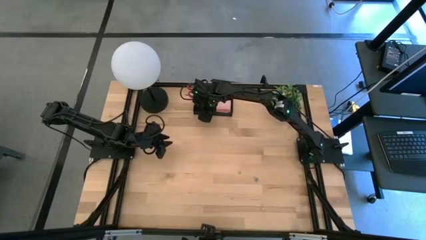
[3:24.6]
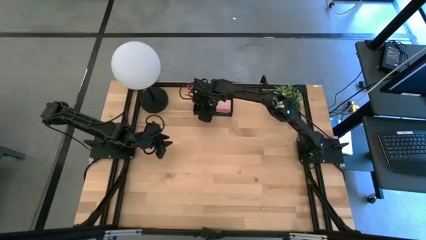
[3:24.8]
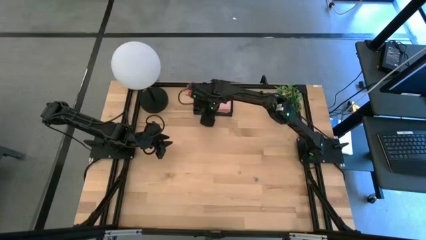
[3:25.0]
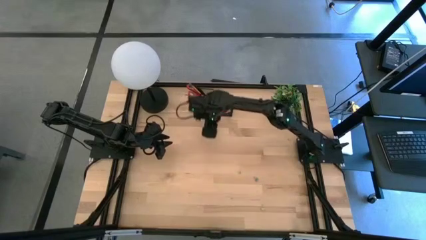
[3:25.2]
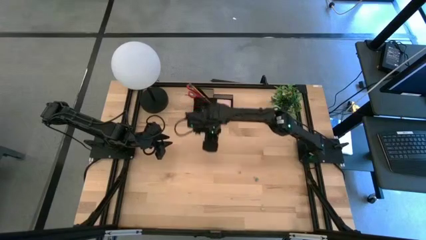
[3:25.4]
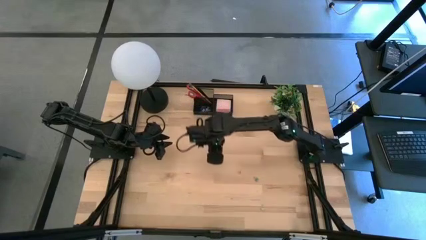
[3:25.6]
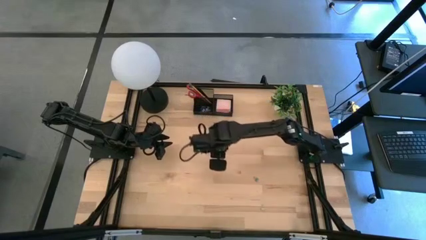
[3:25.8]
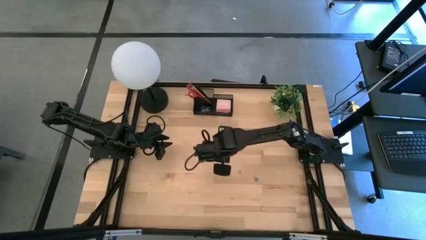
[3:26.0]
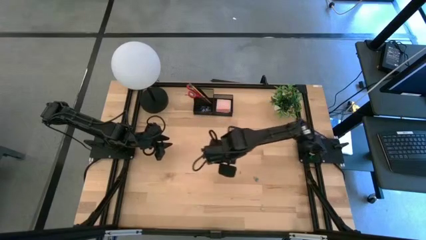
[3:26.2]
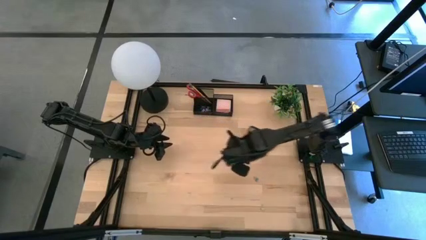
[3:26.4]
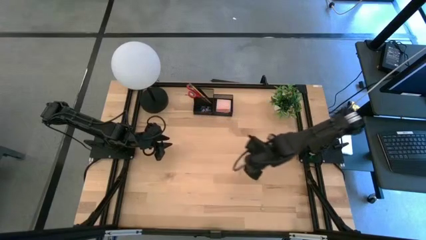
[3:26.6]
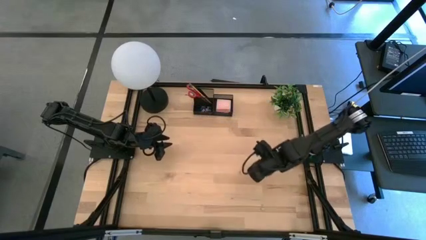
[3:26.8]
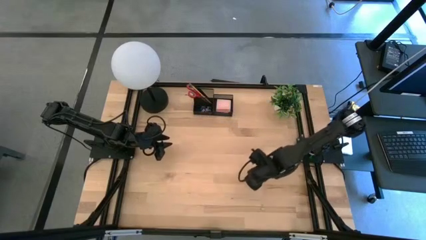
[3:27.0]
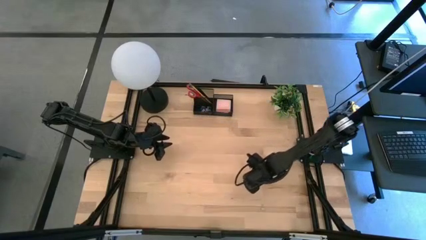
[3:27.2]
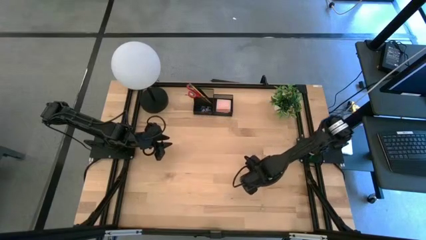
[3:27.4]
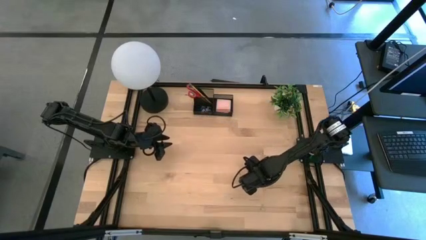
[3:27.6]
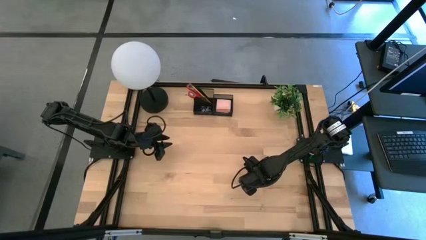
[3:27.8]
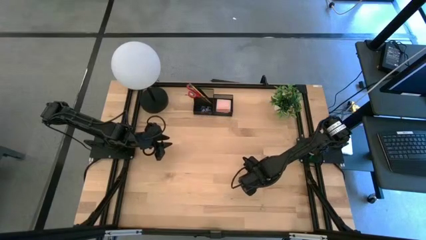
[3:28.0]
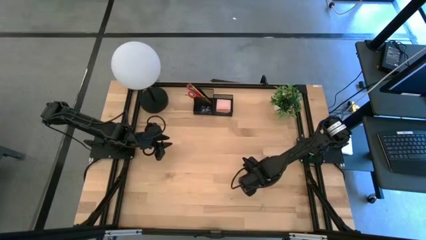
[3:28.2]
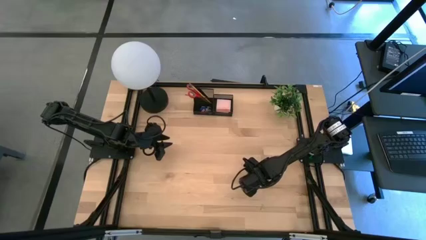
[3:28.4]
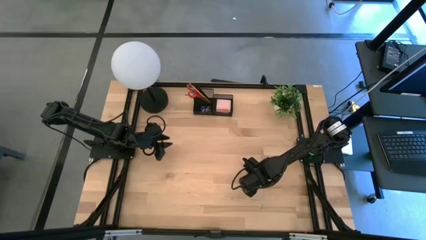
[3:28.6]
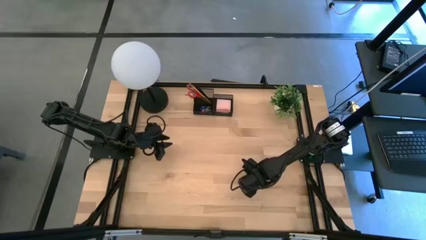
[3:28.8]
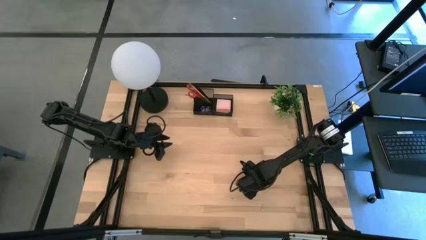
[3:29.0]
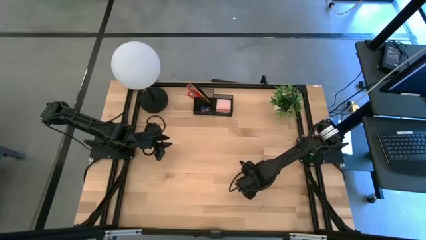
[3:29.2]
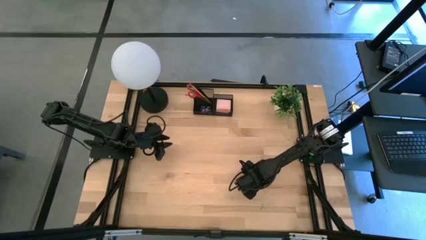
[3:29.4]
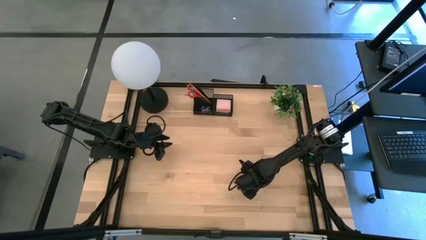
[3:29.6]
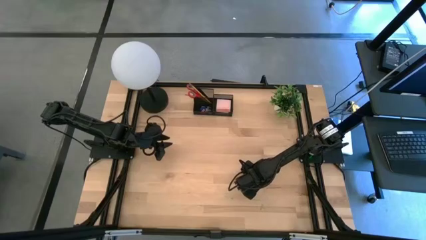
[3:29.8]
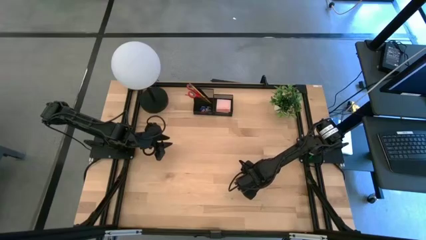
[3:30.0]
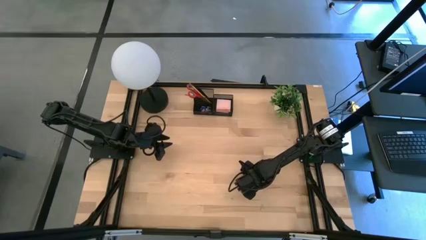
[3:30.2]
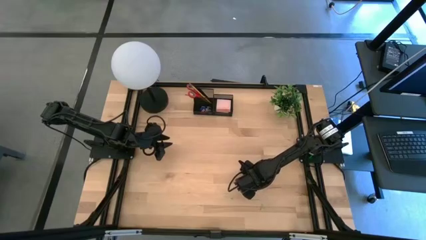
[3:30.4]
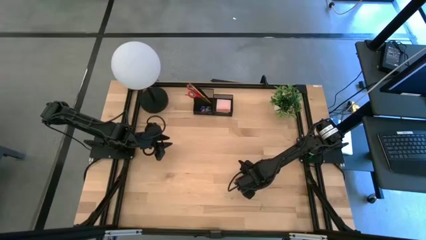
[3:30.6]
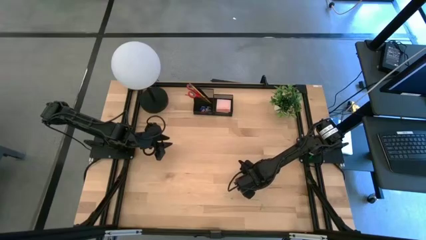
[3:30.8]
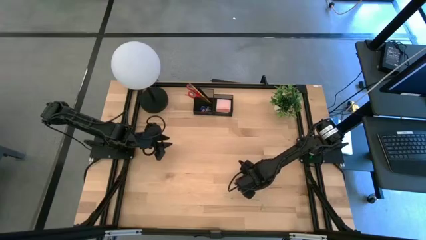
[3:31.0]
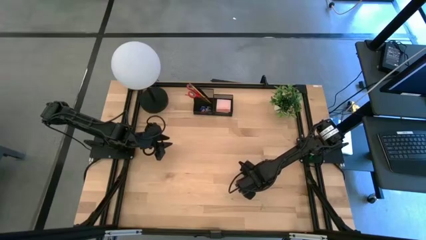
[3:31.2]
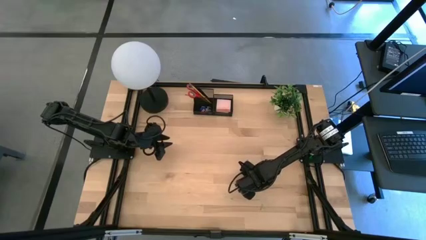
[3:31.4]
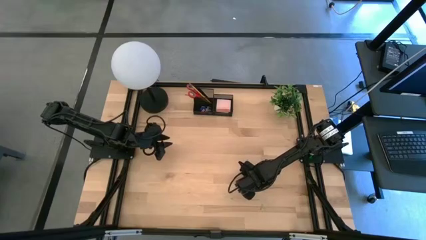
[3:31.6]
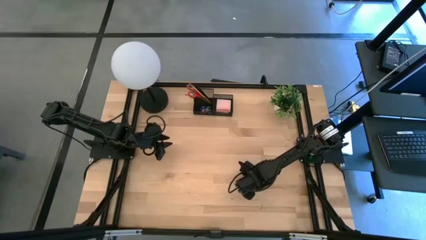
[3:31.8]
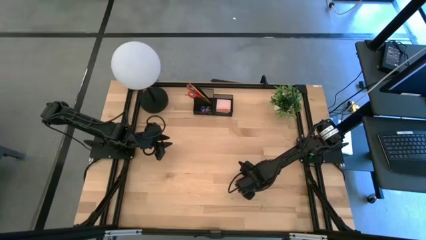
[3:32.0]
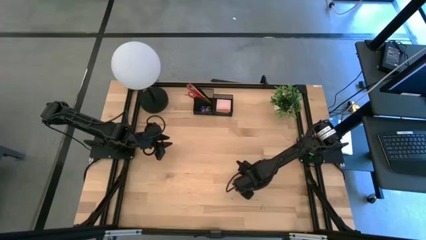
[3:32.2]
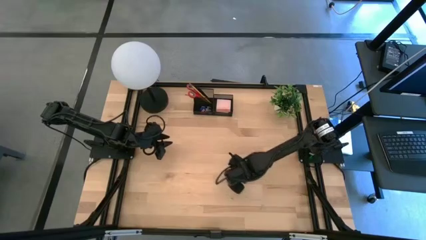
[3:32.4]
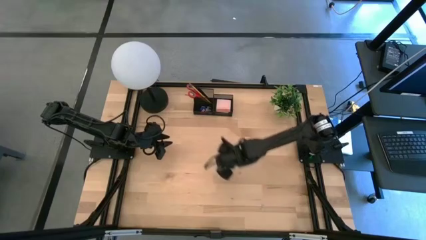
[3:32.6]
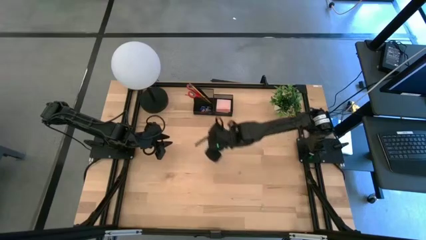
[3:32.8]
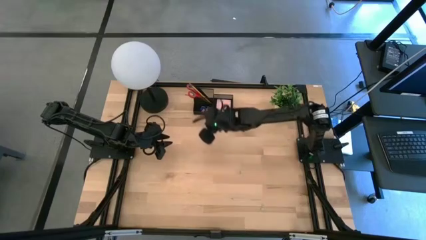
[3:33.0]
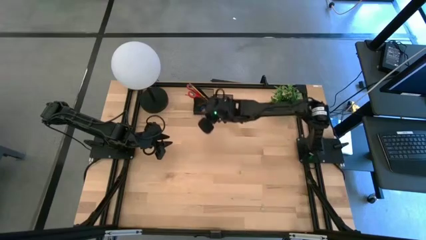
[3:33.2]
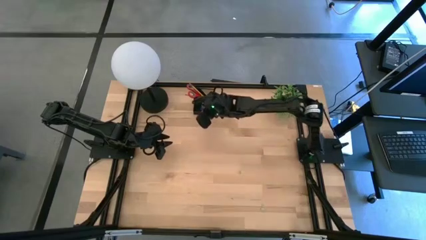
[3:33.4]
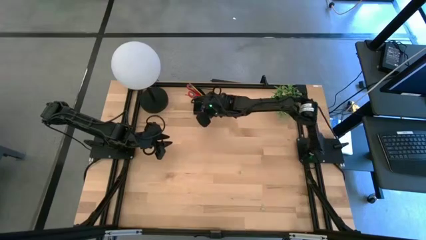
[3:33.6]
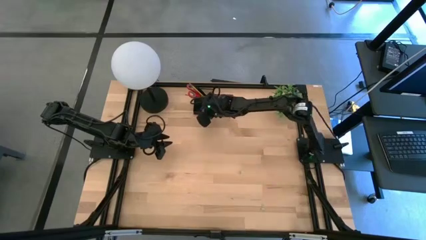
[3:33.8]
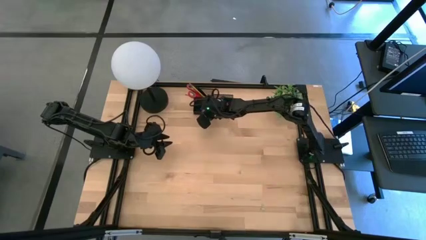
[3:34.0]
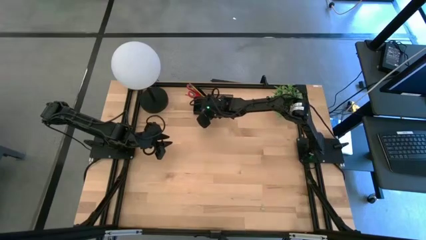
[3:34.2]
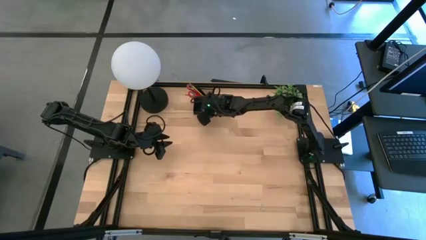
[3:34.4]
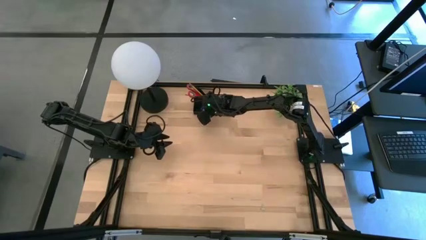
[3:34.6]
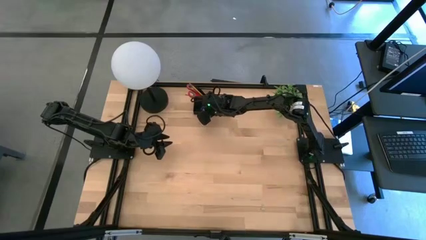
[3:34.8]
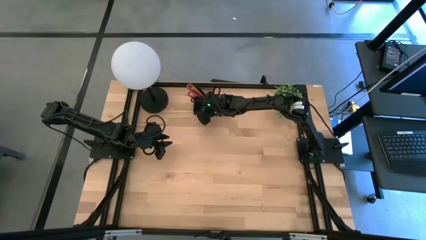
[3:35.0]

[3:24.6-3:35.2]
Task: Pick and place office supplies into organizer
Put the blue binder clip into the black desk organizer
